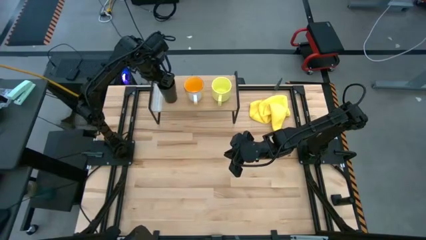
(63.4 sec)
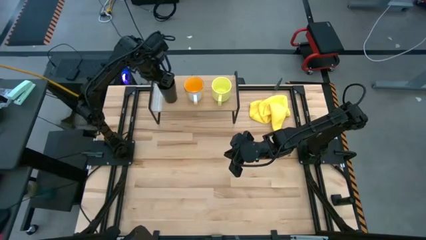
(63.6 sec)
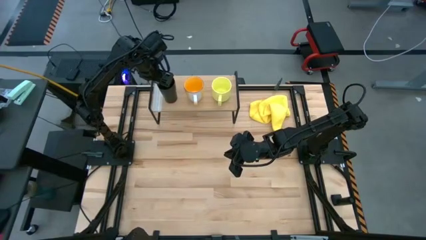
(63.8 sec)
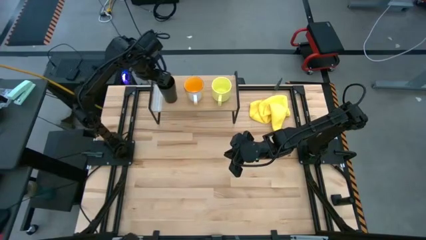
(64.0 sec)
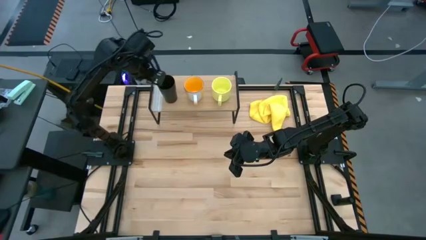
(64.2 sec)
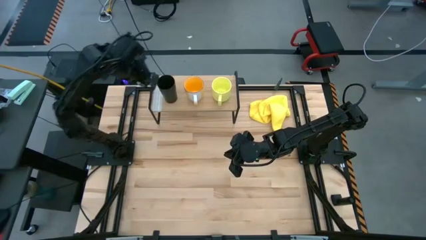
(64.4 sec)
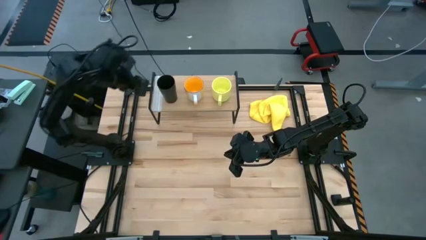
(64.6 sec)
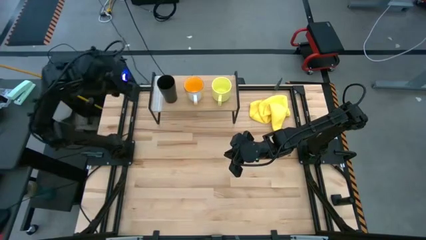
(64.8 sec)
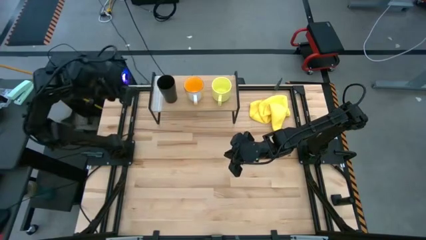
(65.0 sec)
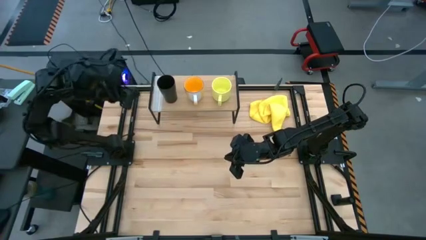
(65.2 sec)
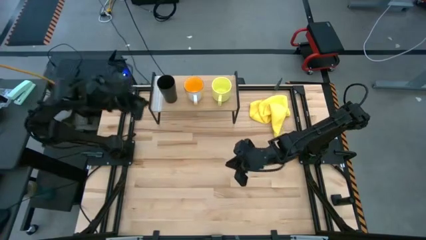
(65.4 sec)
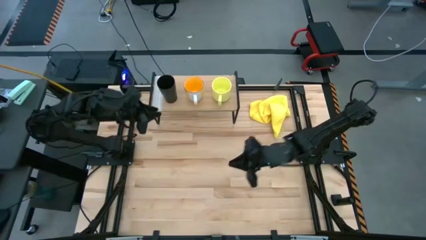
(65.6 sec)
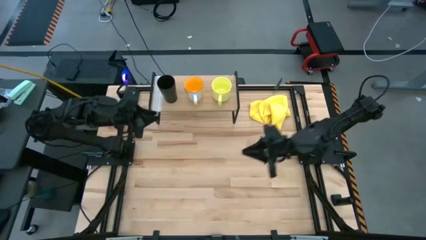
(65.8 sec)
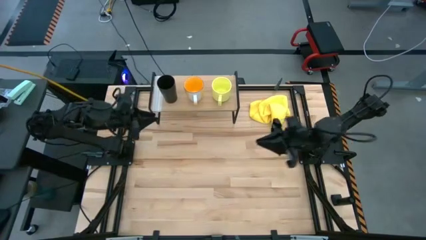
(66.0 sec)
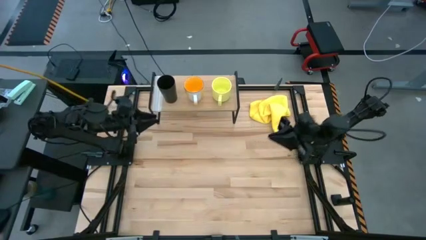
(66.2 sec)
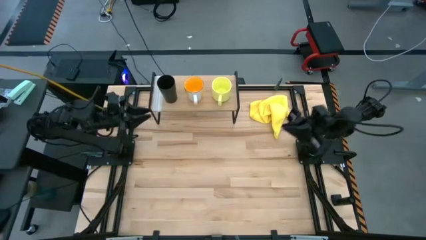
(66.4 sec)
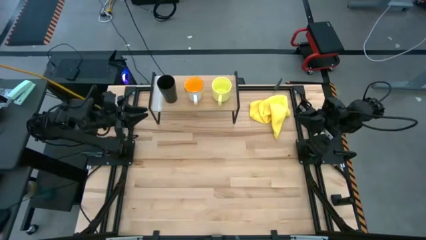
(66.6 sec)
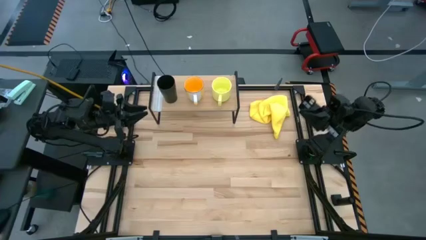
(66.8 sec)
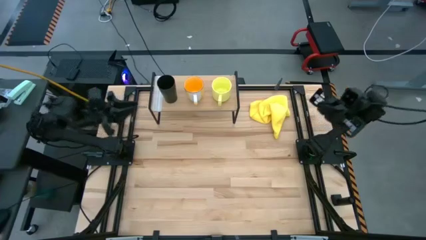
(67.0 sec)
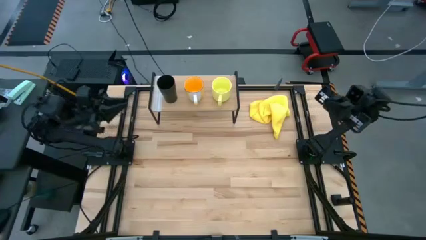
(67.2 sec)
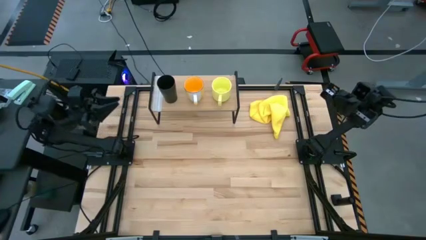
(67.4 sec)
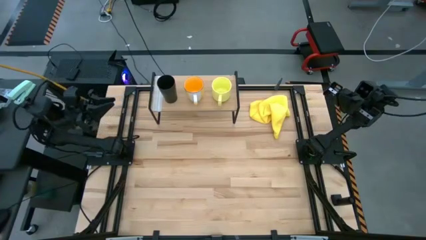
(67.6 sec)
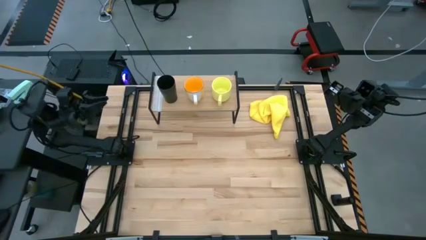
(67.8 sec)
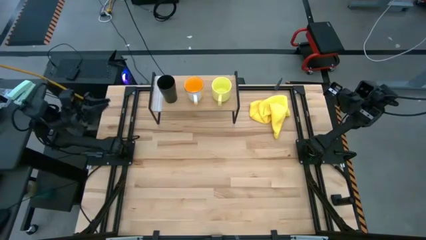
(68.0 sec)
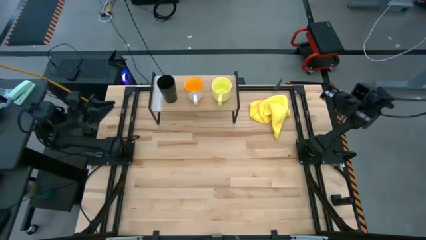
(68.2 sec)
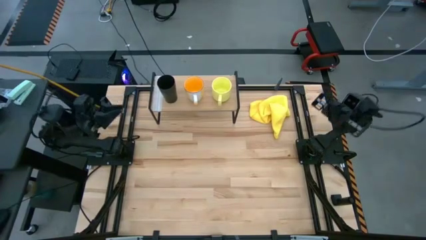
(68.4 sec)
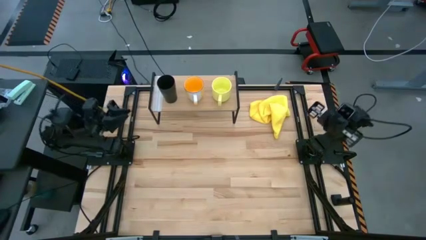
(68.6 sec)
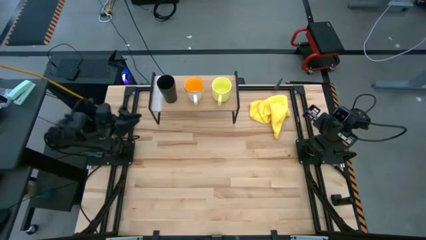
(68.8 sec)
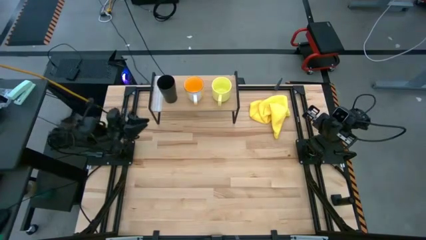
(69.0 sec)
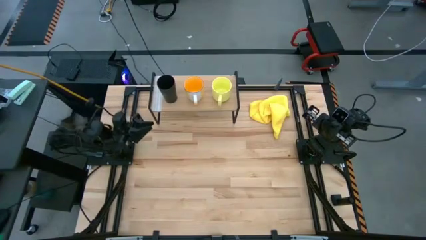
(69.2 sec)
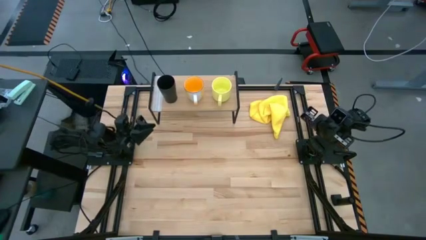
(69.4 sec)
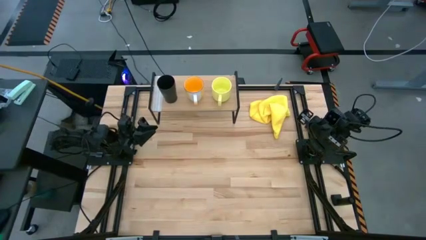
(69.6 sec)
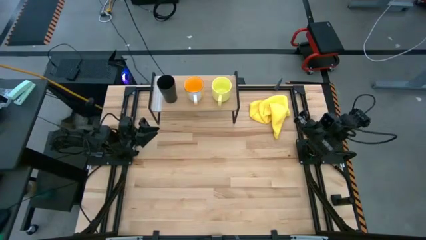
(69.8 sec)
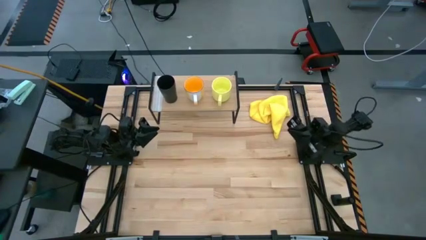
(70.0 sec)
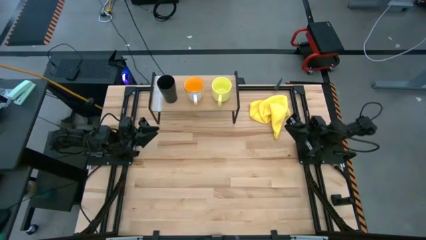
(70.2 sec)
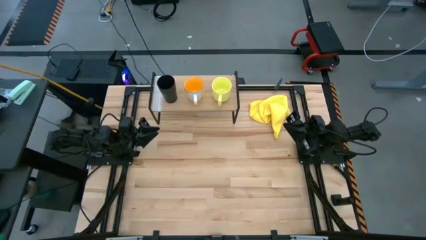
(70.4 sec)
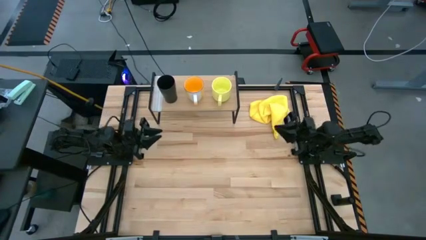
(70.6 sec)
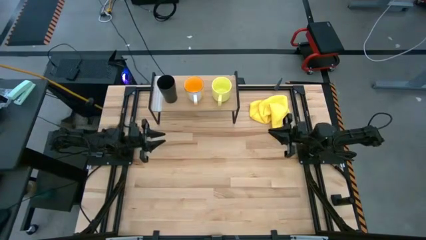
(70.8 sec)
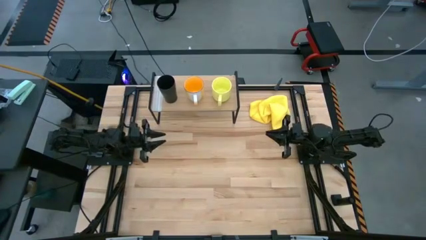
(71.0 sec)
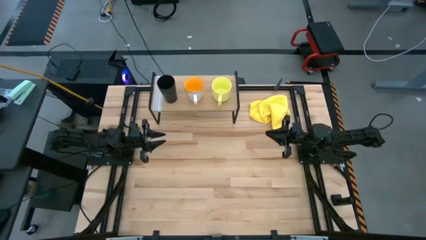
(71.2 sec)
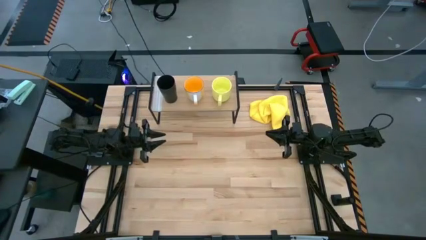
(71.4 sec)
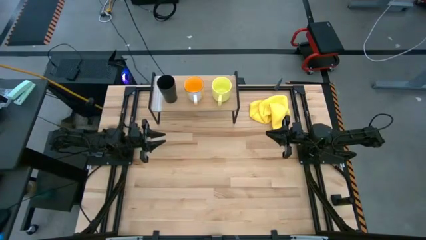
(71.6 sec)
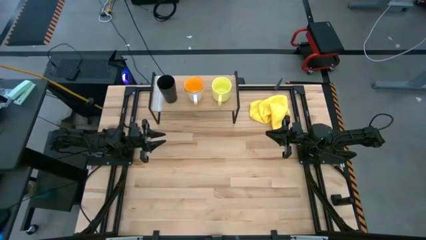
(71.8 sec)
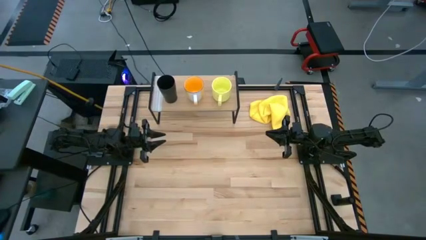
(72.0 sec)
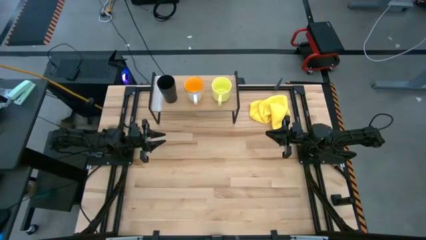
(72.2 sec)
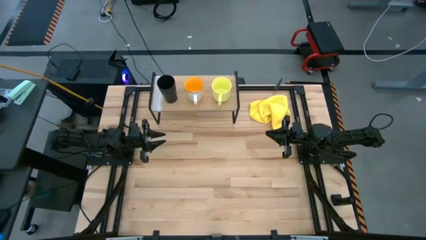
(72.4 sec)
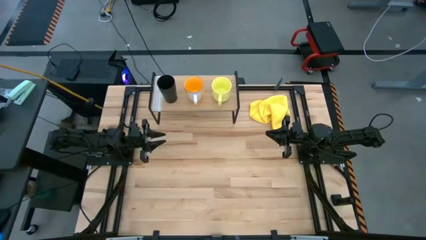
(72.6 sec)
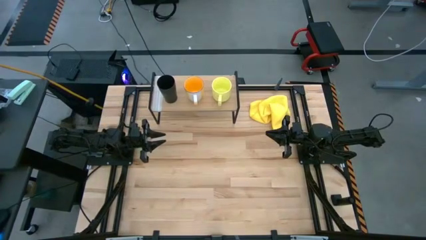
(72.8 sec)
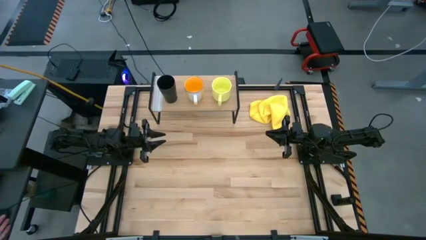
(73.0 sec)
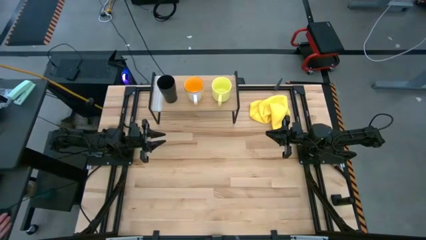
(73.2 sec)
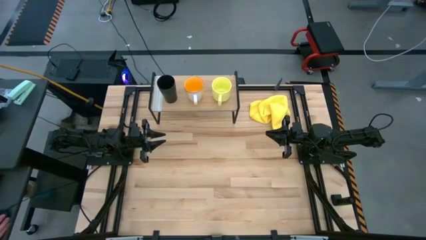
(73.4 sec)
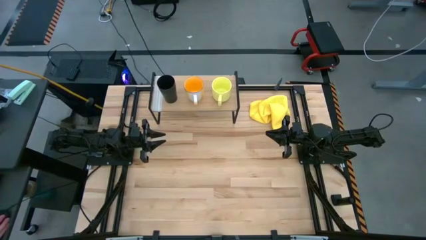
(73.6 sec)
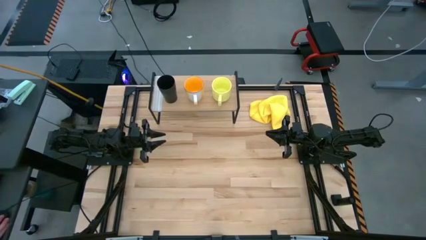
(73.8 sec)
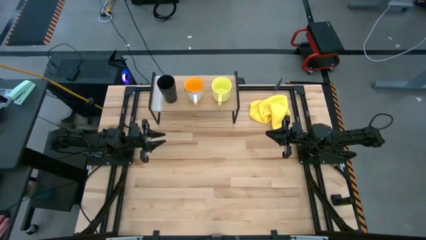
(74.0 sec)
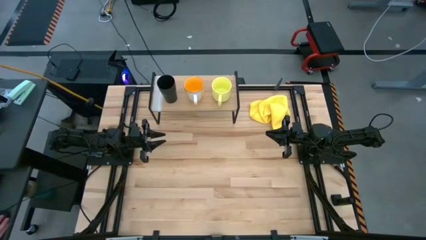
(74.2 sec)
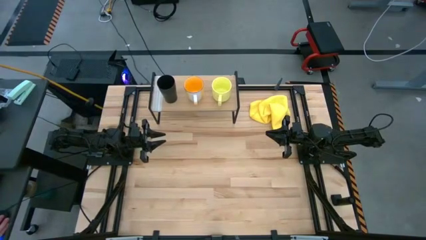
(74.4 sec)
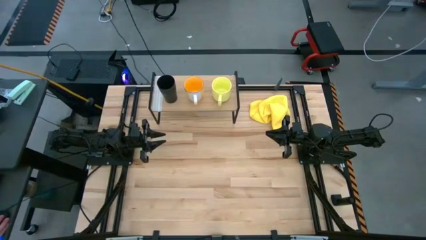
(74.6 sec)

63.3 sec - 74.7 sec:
Task: Stack small to large cups/mugs on shelf
Return to Home Position
